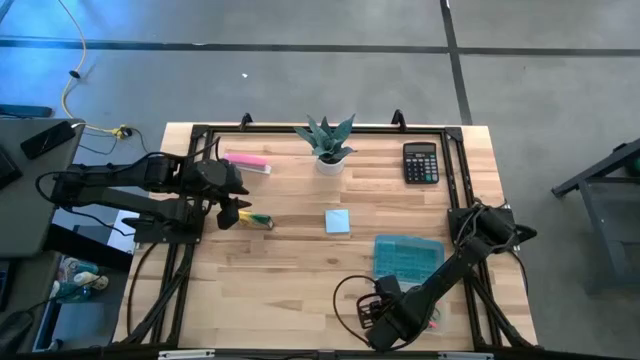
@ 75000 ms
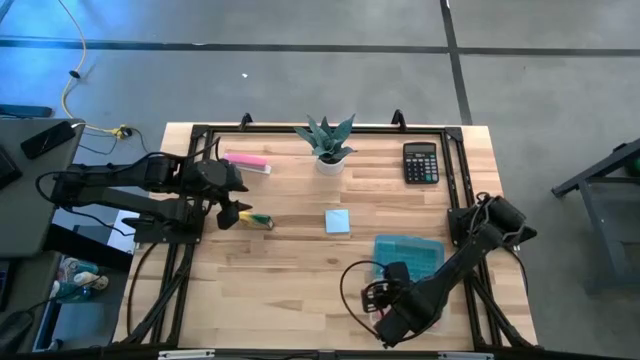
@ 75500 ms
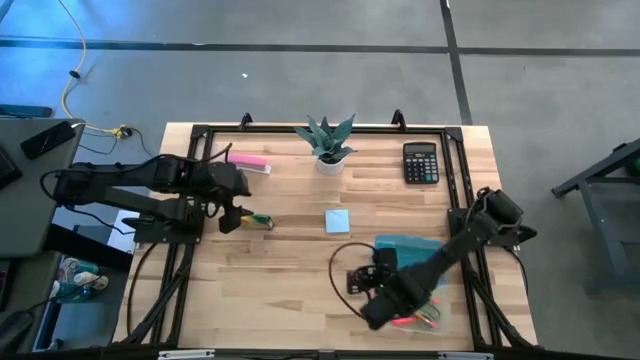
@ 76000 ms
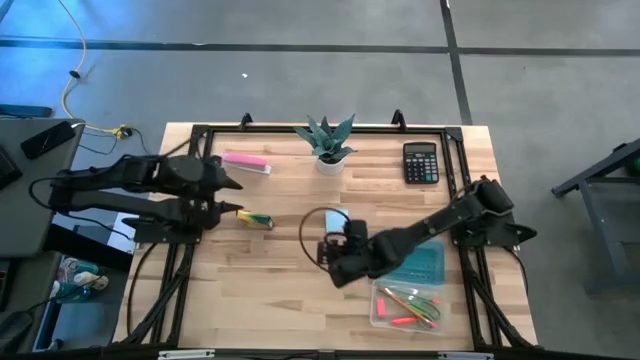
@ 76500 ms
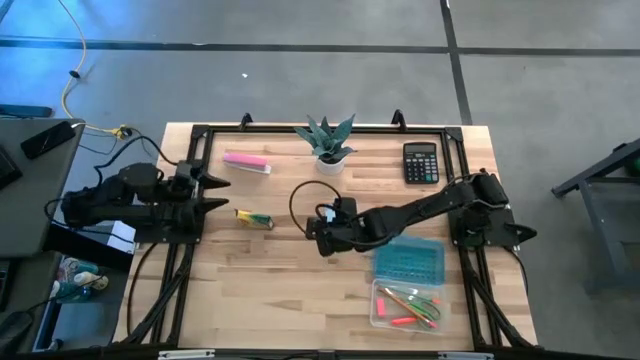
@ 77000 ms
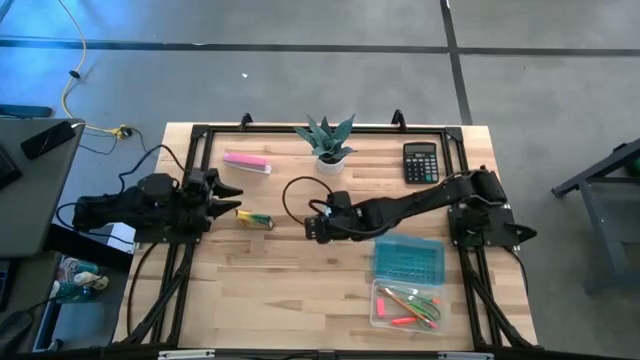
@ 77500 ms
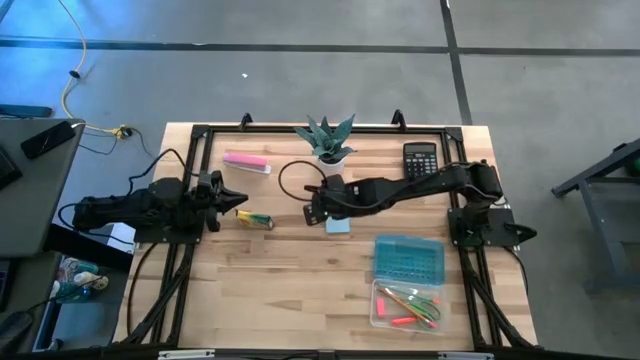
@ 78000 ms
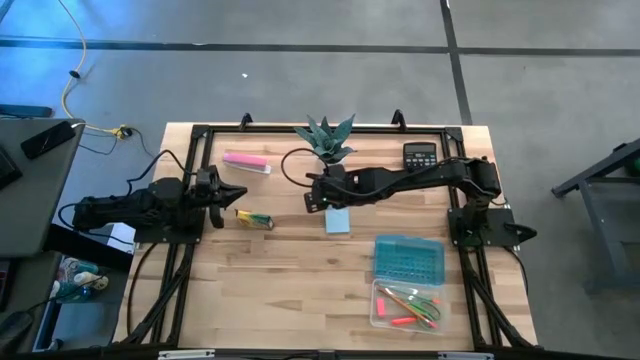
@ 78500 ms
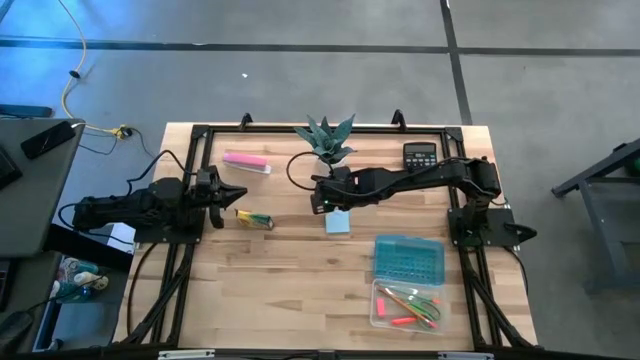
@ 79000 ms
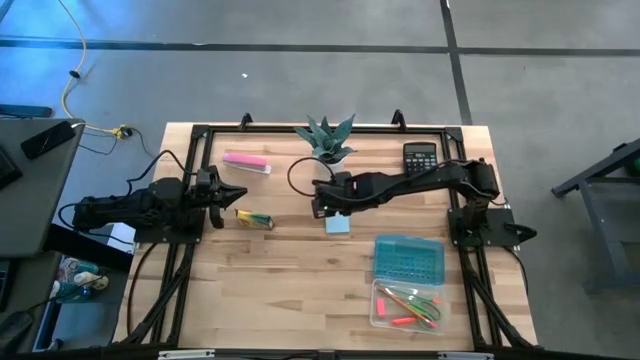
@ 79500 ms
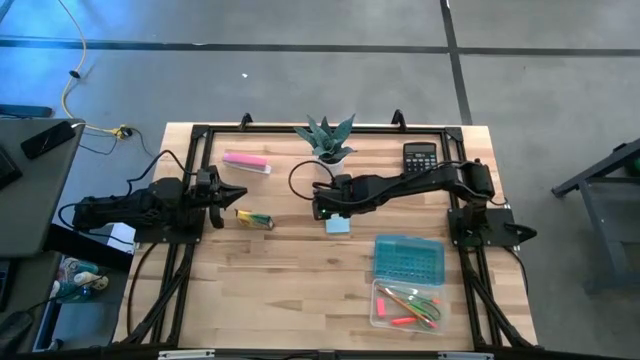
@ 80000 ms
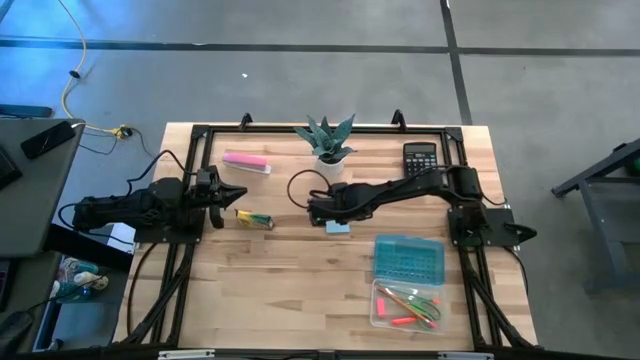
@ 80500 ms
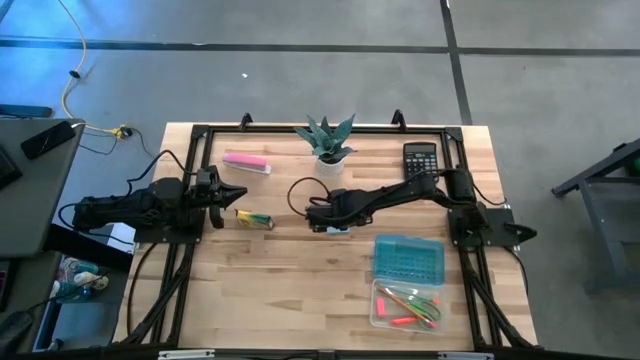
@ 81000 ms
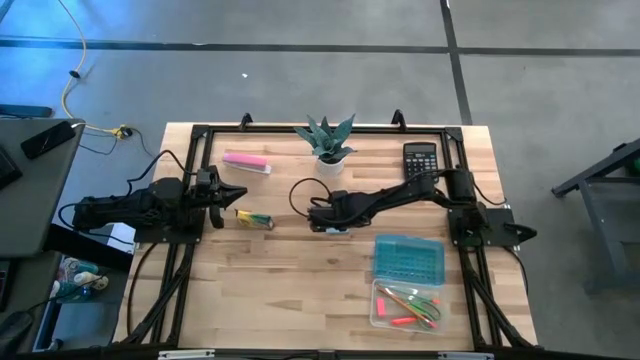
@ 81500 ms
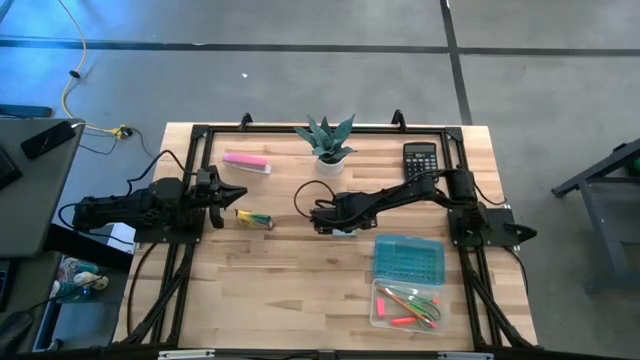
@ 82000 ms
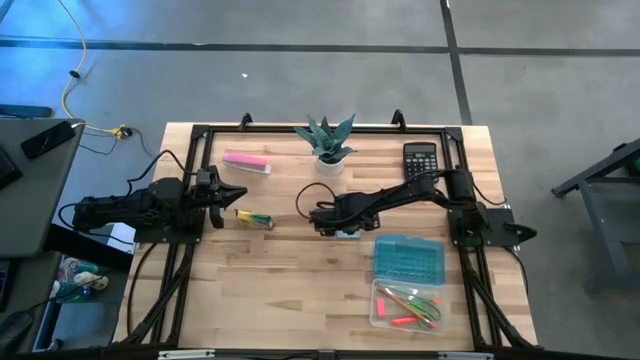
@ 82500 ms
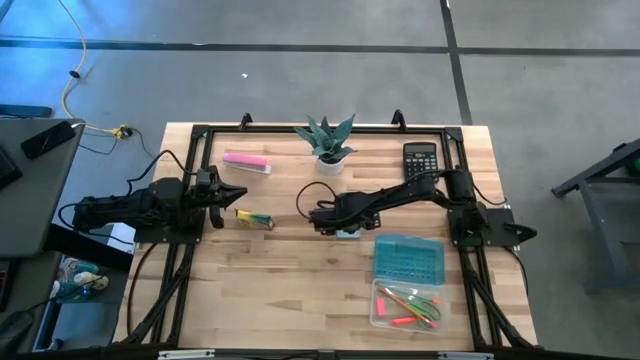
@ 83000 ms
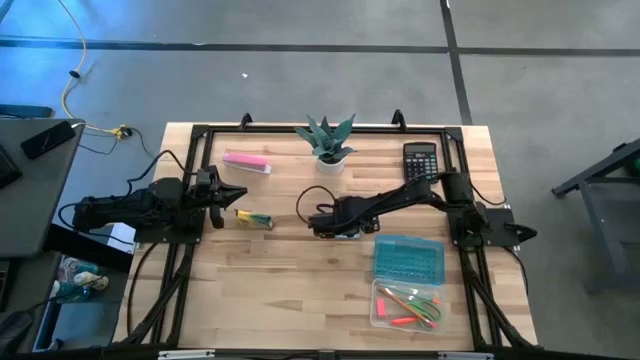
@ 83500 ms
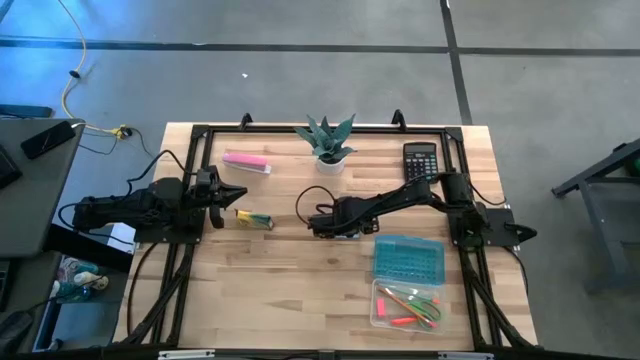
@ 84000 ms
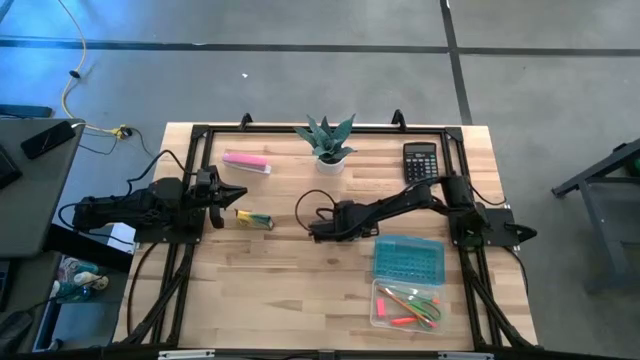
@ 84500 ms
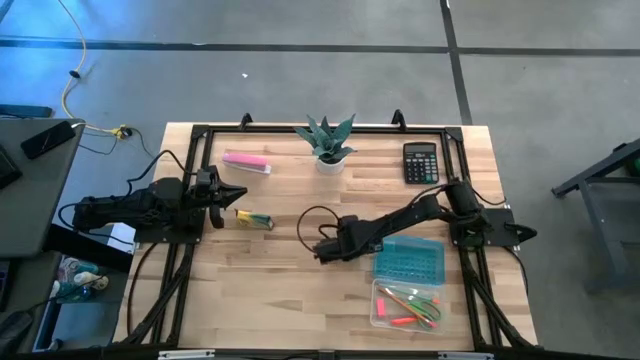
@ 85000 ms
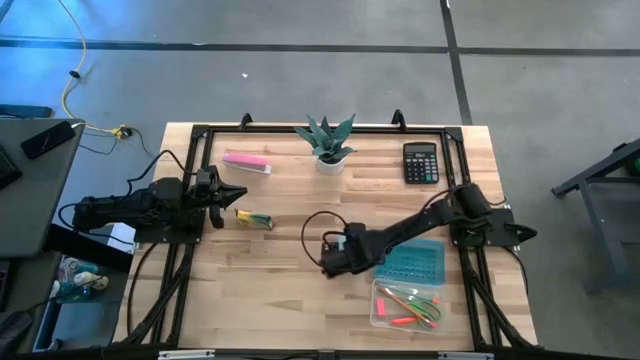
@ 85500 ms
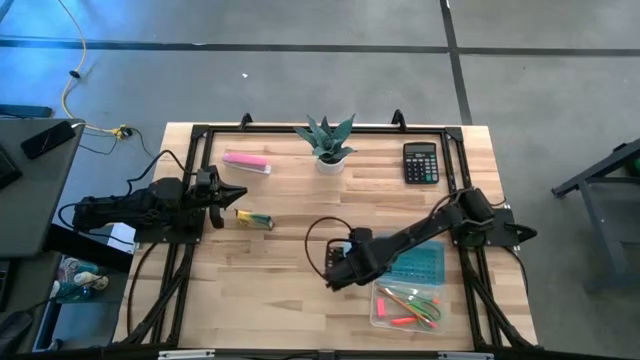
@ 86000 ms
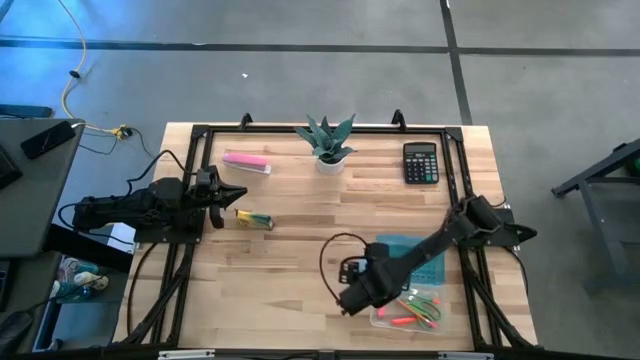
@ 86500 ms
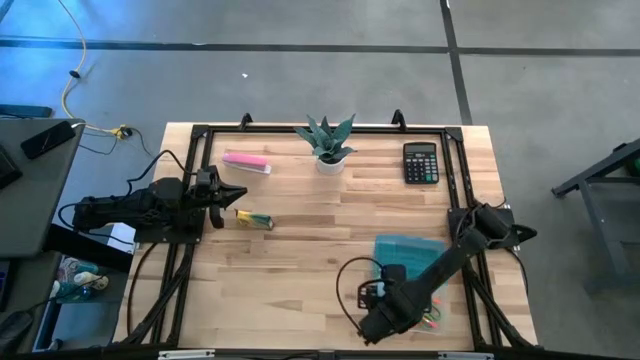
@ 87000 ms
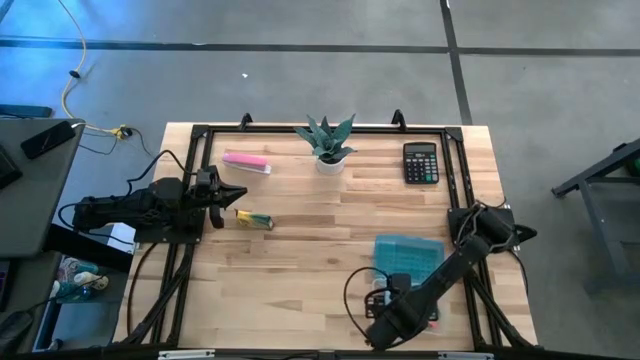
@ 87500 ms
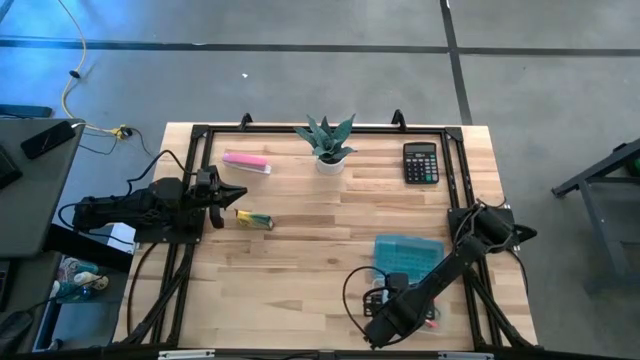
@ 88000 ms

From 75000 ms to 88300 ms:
Task: Pack school essentials
Put the blue sticky notes into the blue supply box

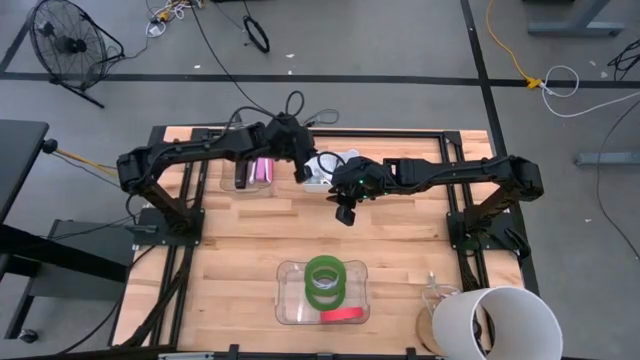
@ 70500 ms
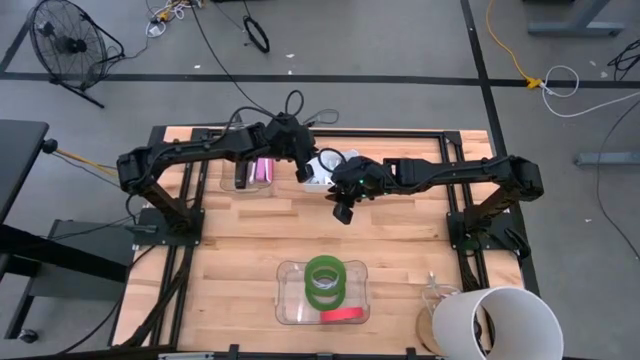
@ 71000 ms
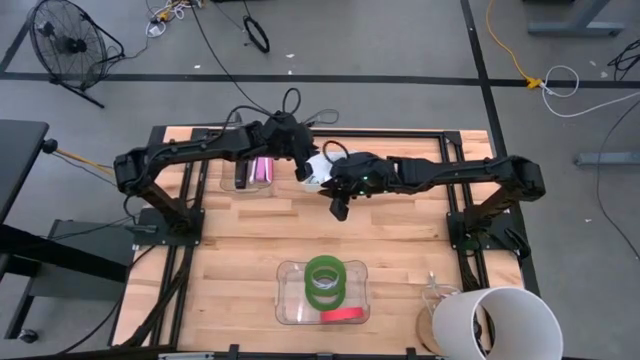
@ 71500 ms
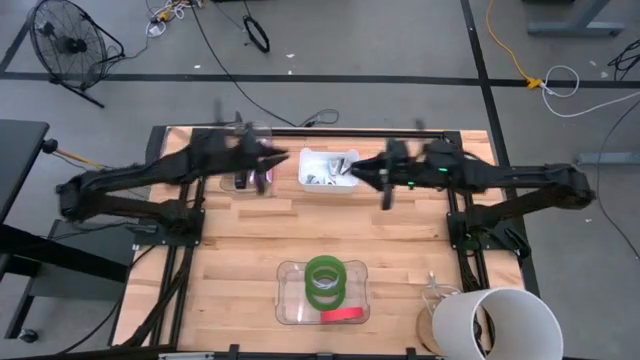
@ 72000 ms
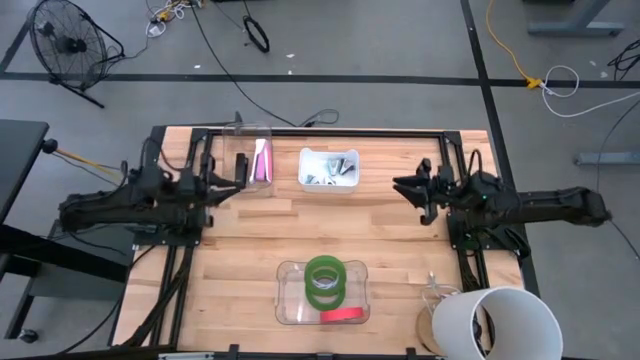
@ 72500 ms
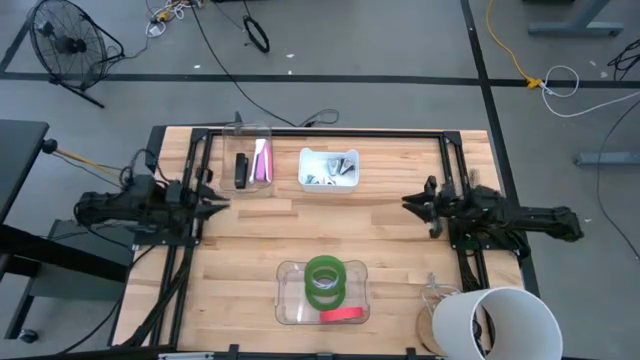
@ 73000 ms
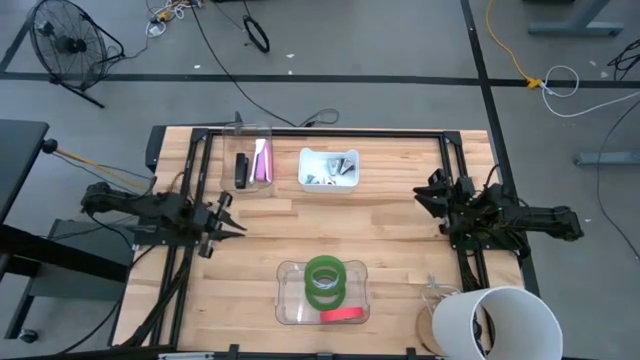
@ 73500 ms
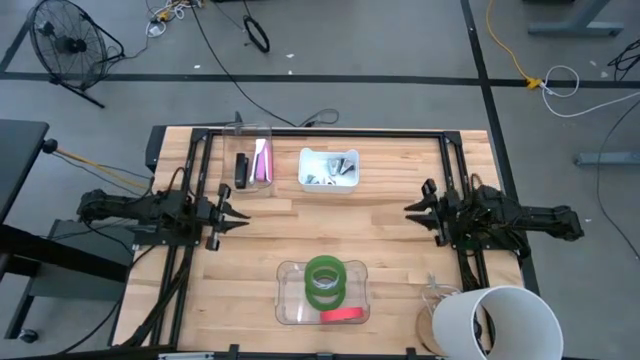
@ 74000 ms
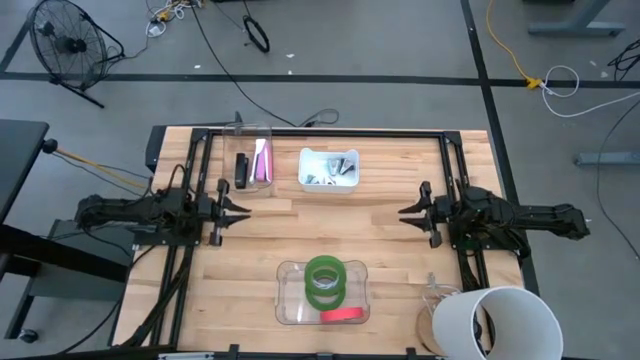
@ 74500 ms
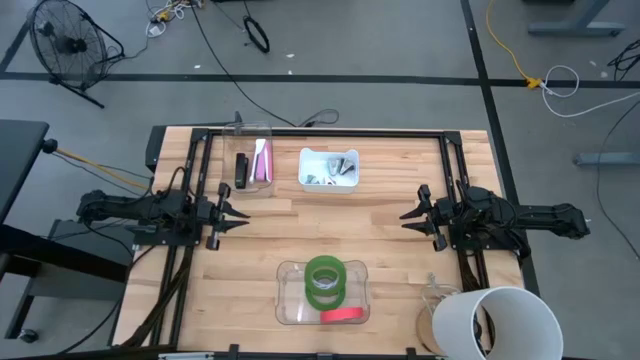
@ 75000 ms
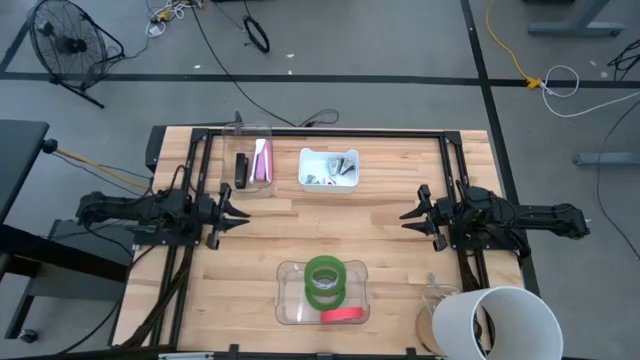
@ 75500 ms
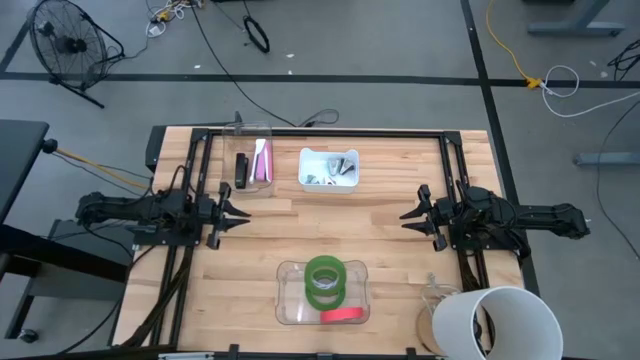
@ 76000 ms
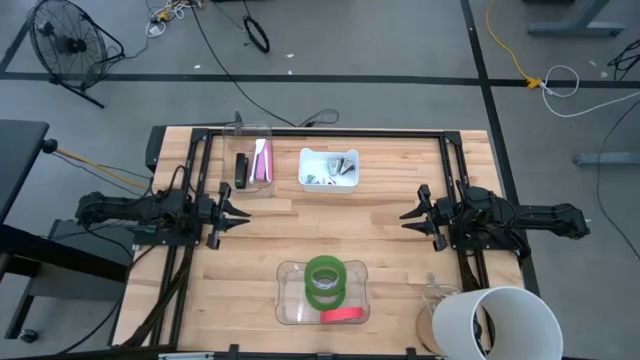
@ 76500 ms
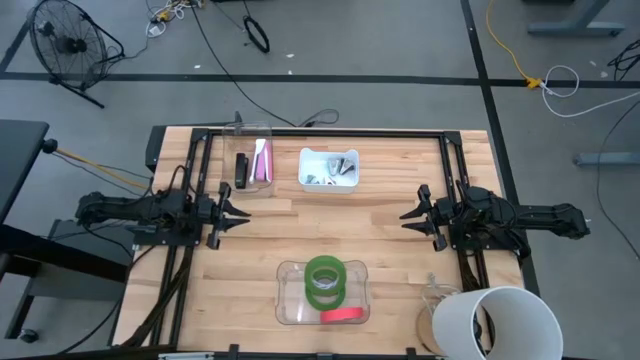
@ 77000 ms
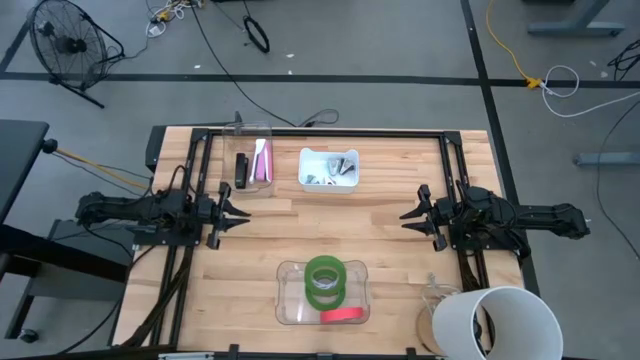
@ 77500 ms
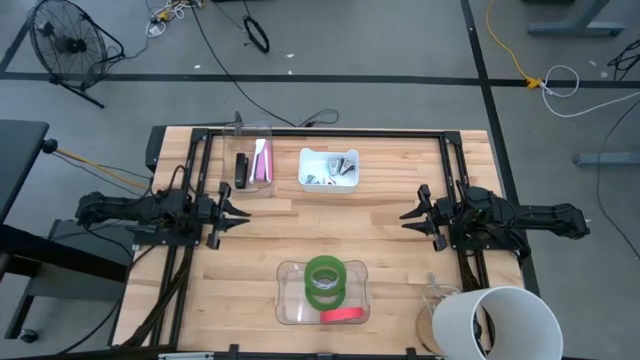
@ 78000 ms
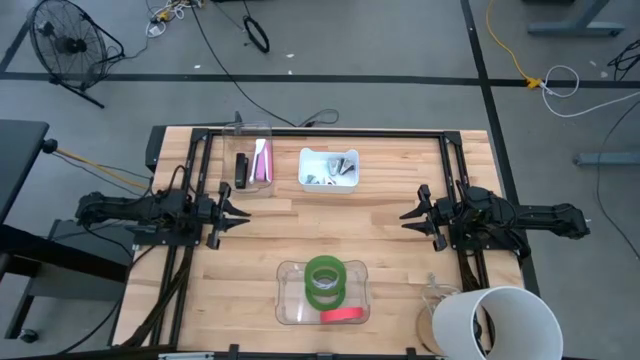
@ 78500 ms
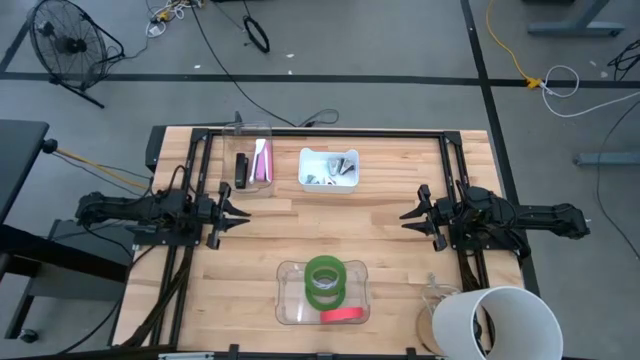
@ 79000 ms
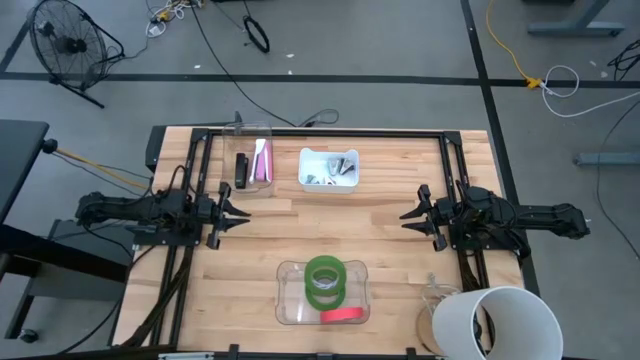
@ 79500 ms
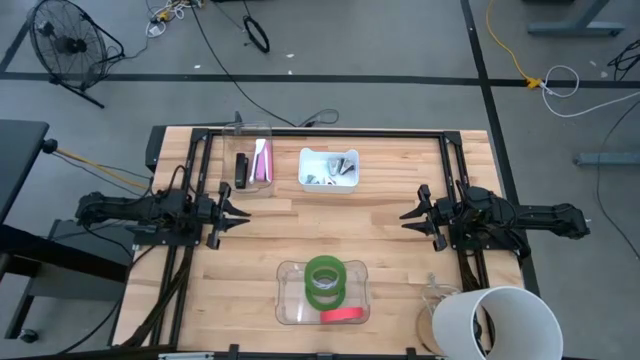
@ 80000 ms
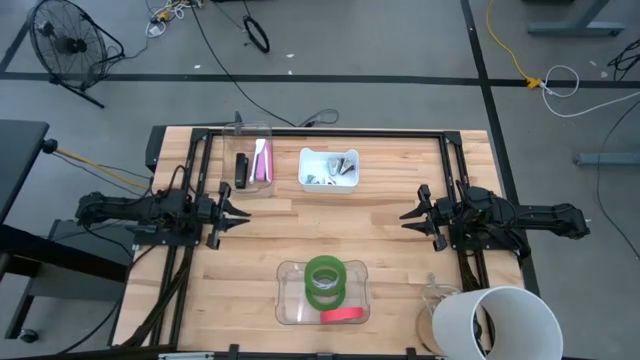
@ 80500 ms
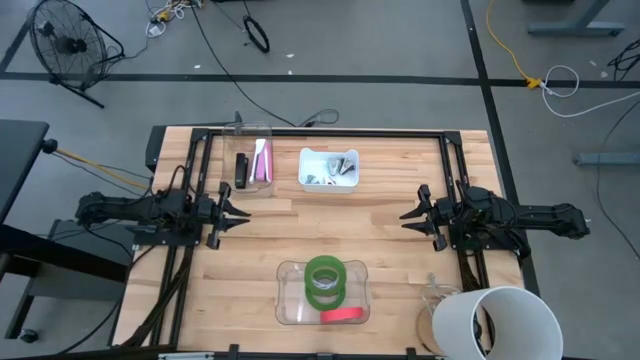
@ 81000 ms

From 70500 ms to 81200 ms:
Task: Pick and place Stapler, Stapler remover, tape
Return to Home Position
